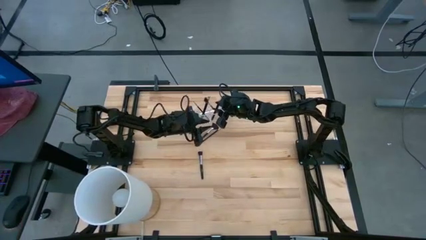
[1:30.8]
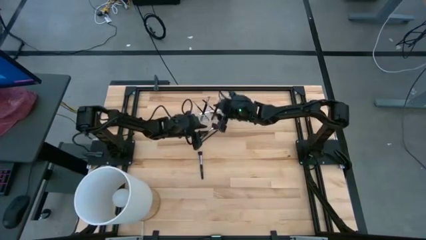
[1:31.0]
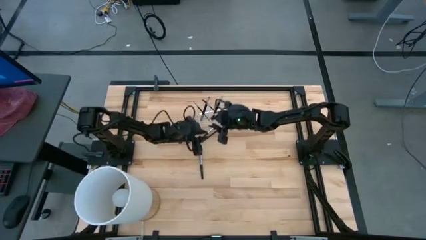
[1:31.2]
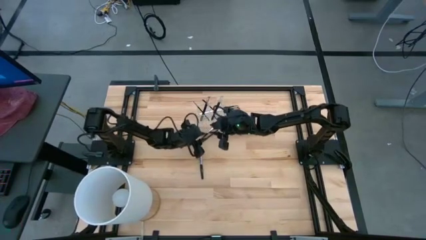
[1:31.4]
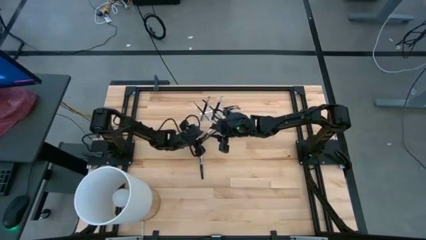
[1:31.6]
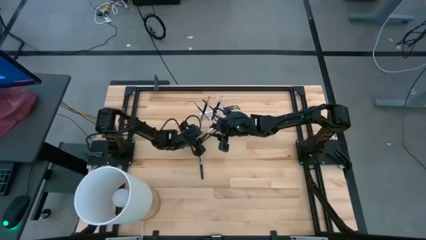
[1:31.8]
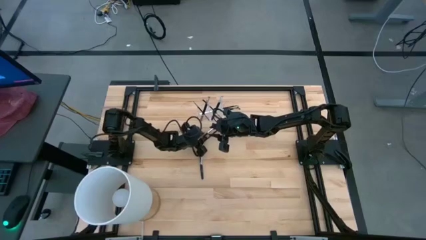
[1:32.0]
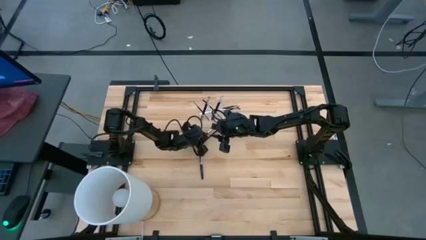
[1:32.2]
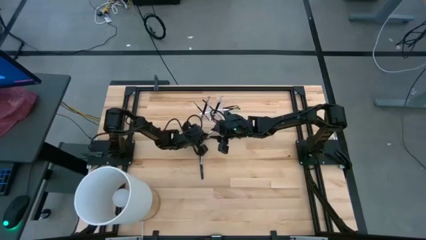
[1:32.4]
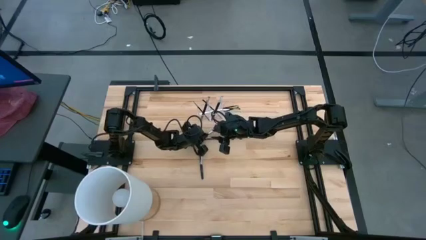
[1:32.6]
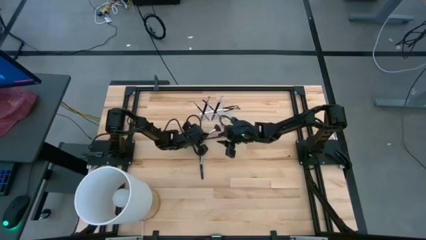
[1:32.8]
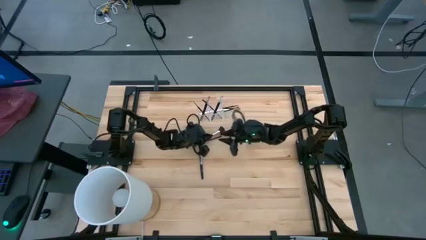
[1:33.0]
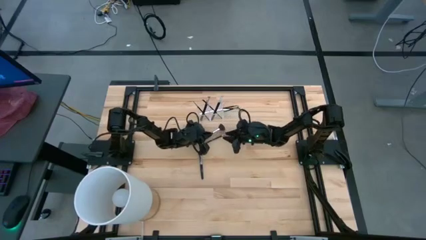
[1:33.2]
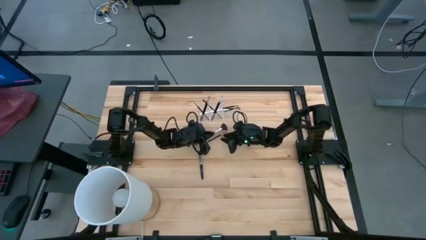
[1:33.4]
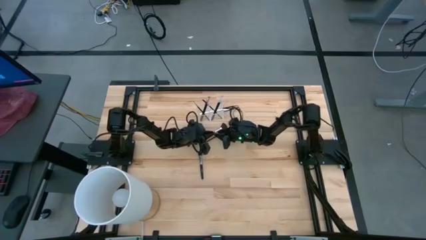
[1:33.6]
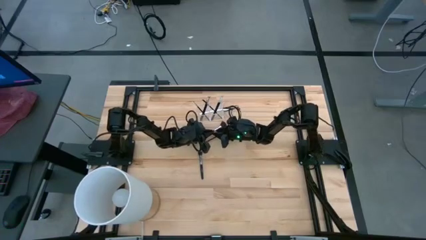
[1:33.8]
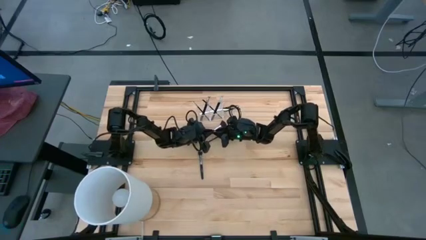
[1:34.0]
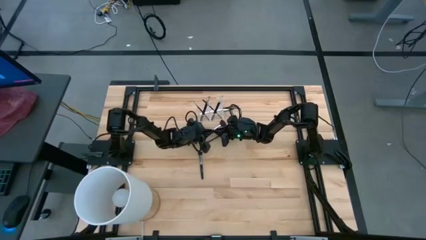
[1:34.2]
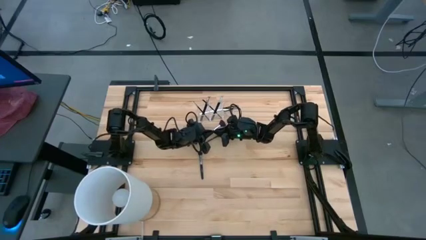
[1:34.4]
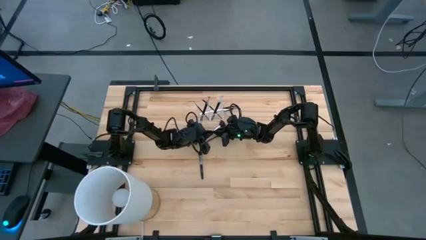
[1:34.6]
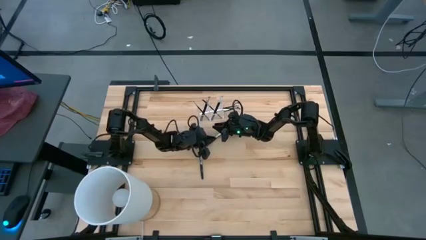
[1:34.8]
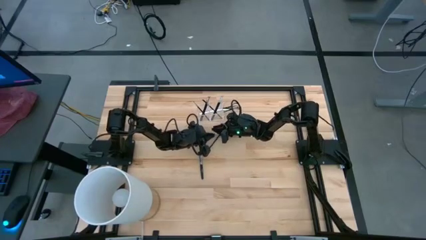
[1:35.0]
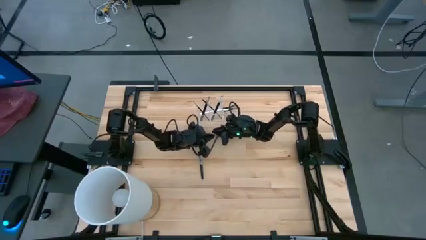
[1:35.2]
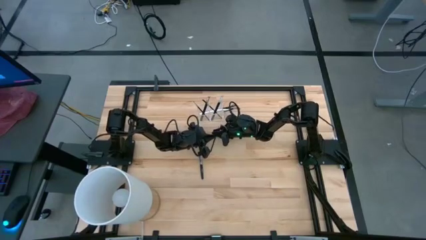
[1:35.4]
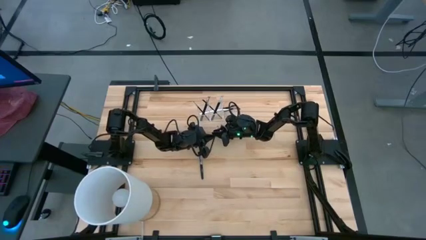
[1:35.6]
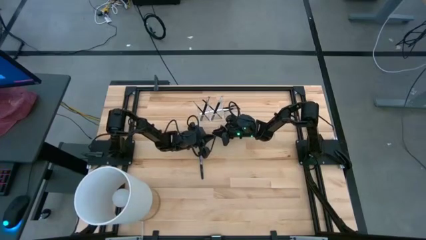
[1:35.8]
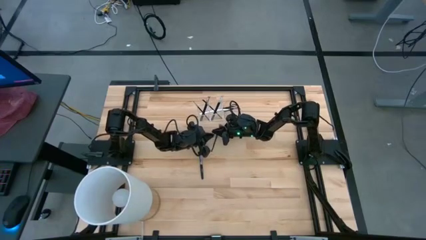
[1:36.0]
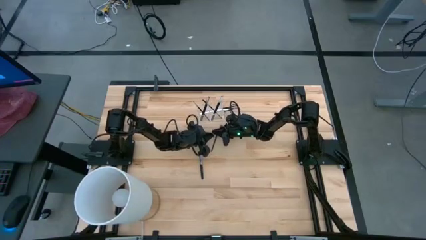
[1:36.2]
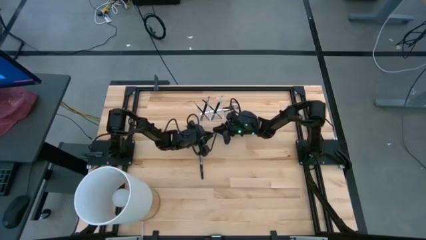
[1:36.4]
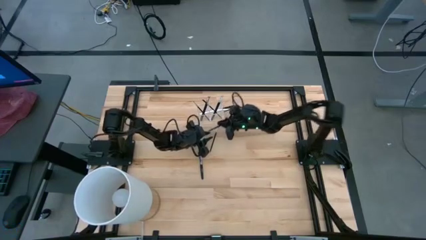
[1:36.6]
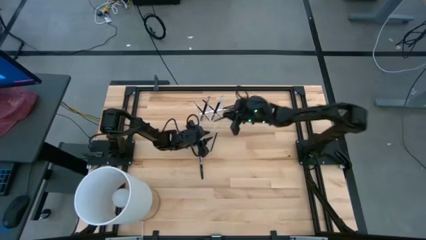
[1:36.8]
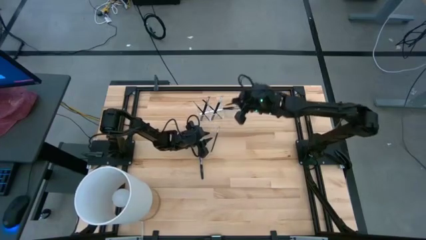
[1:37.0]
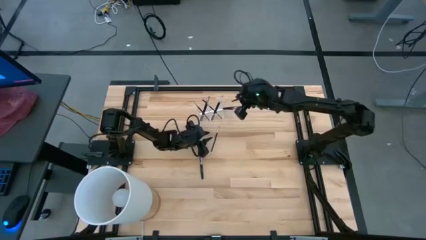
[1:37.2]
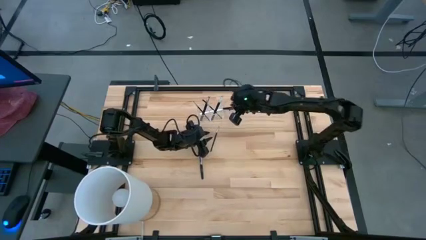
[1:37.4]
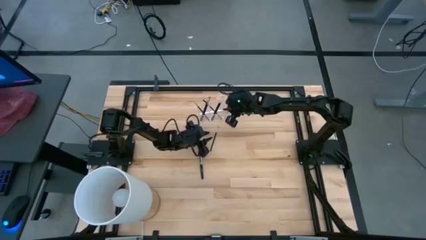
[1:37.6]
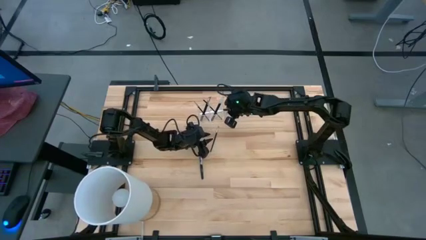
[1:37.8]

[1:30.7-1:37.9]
Task: Put items in baskets/containers
Put the black highlighter brush into the transparent organizer

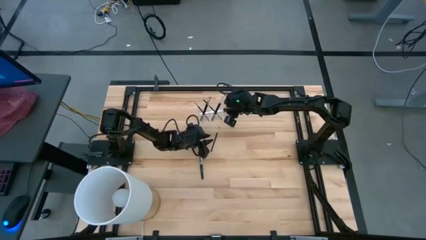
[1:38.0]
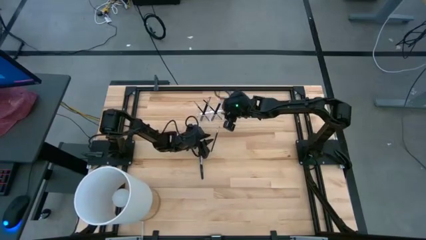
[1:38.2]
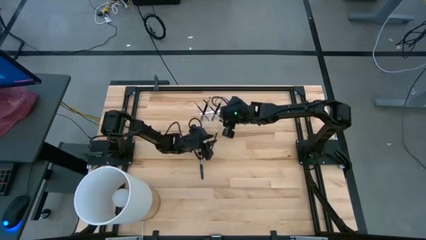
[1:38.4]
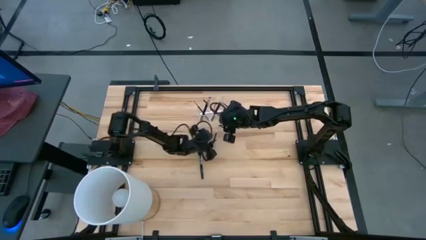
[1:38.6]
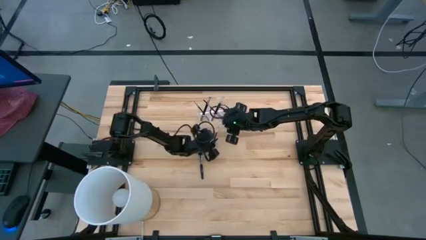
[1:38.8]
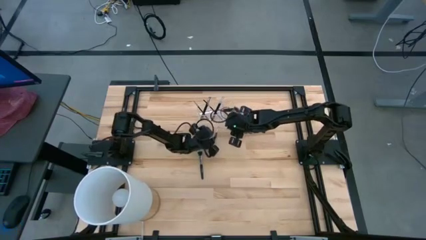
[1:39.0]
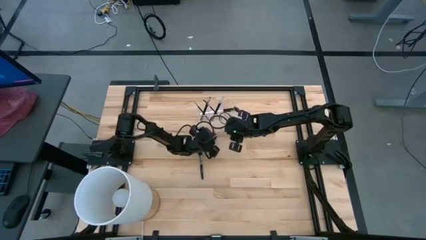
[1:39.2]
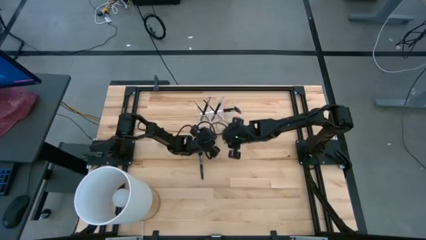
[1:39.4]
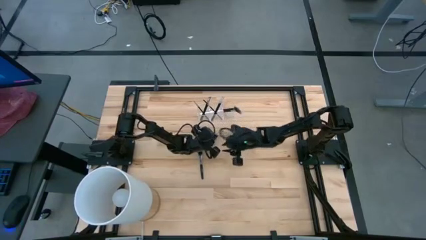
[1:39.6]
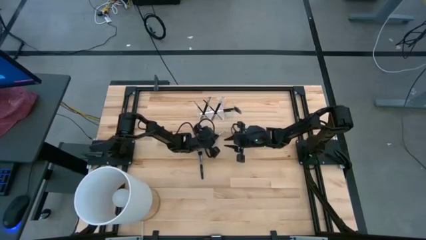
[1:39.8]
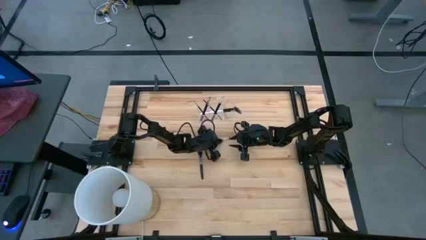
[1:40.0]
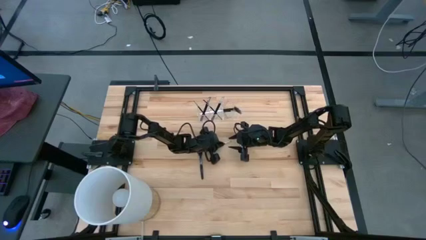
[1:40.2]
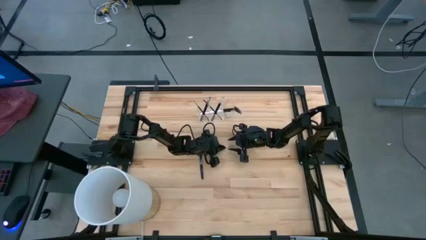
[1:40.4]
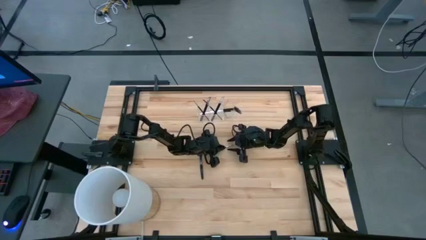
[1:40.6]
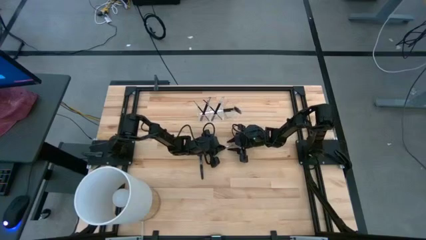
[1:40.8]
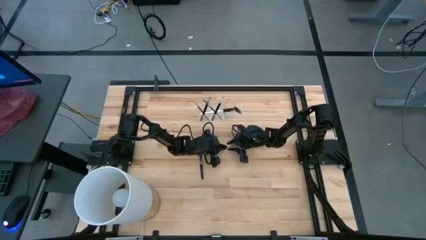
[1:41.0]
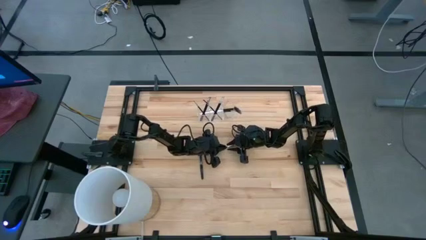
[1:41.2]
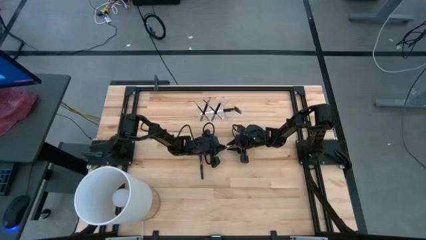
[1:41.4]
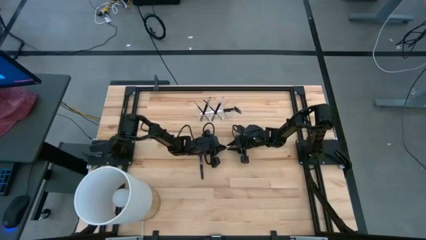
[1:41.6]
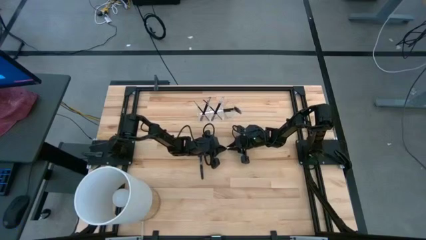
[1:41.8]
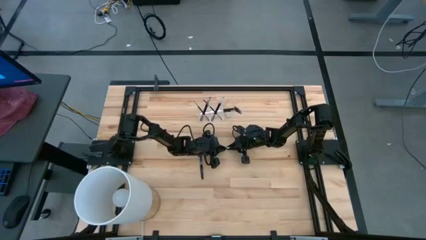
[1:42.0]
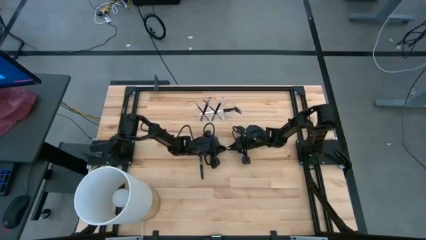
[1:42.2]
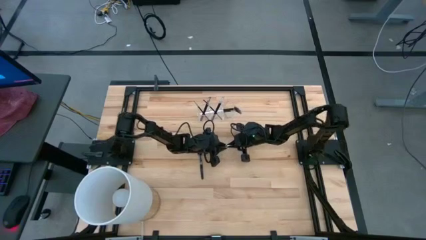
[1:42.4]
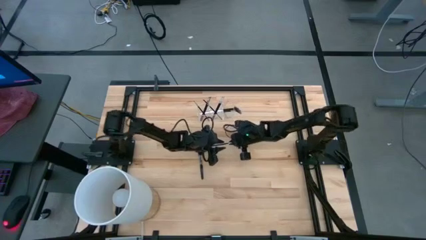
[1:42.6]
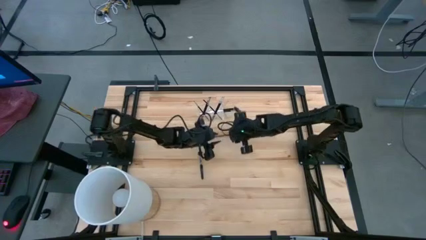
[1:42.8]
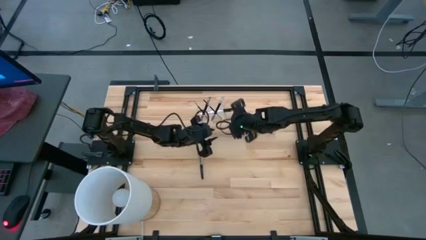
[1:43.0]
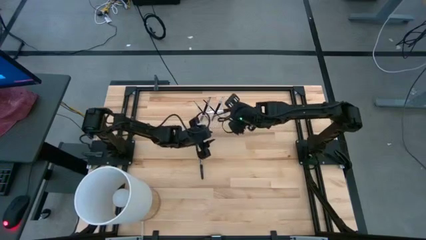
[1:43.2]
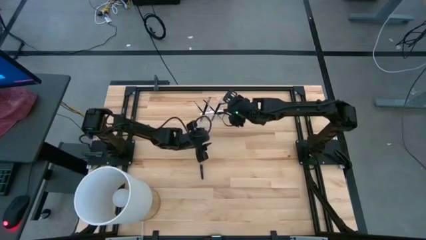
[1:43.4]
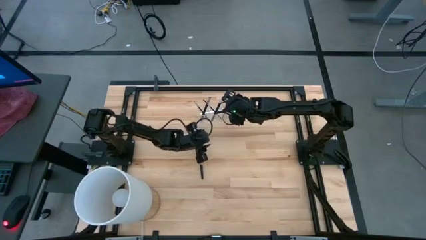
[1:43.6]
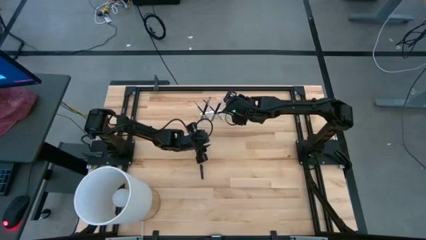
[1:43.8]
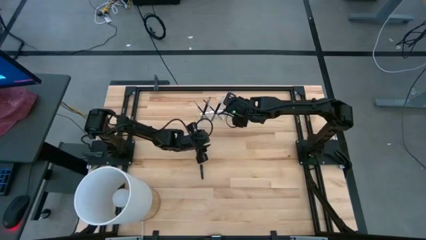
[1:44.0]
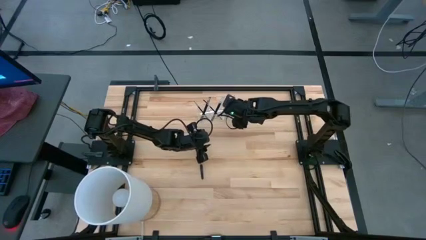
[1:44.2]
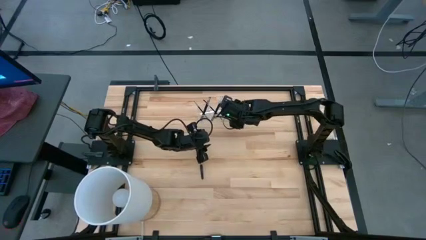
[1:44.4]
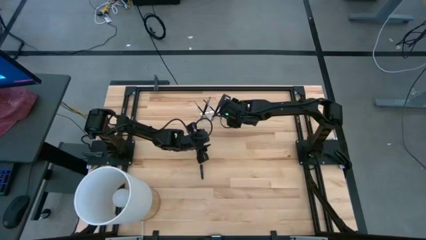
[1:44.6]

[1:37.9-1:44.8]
Put the black eyeshadow brush into the transparent organizer

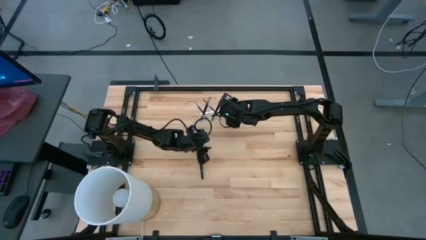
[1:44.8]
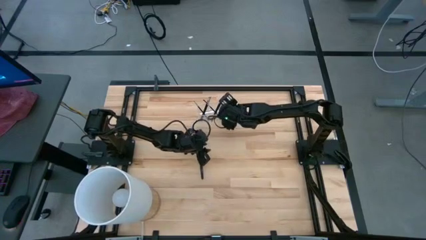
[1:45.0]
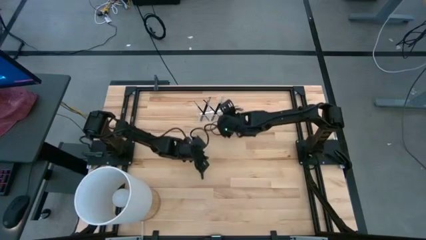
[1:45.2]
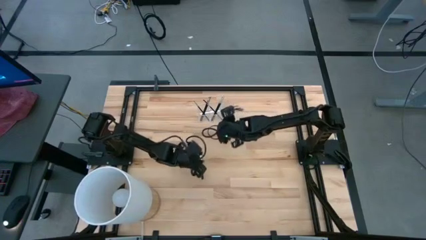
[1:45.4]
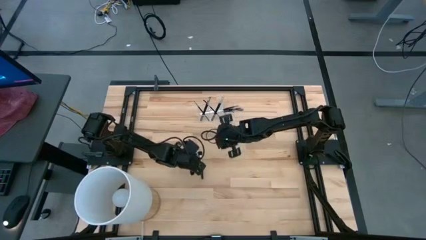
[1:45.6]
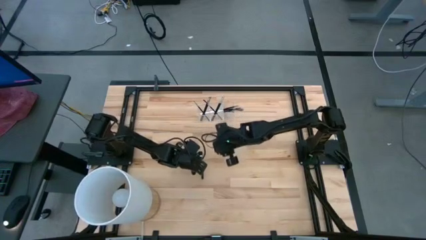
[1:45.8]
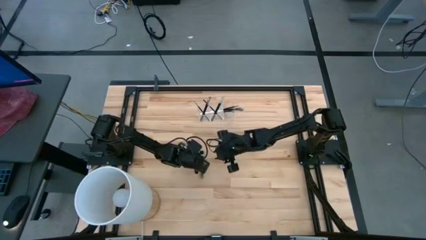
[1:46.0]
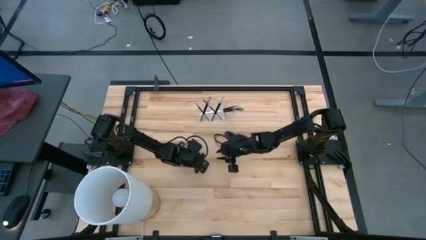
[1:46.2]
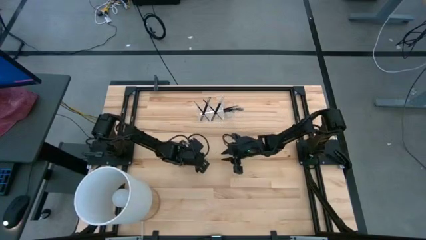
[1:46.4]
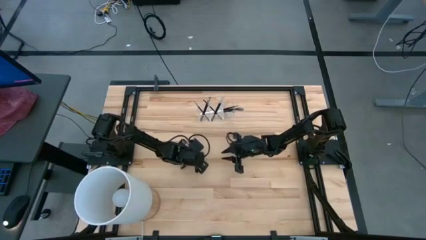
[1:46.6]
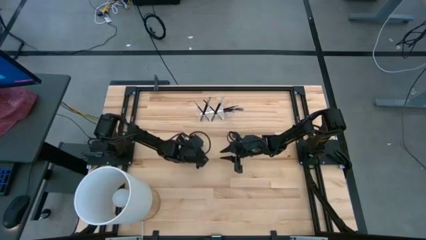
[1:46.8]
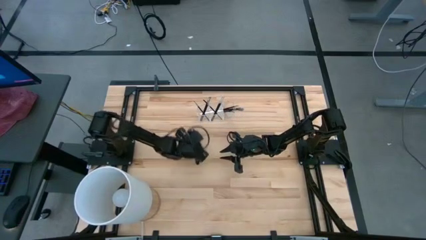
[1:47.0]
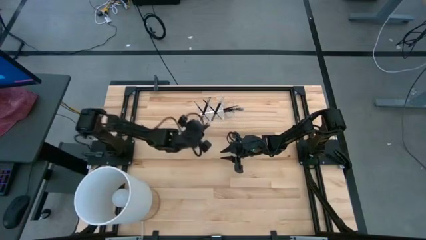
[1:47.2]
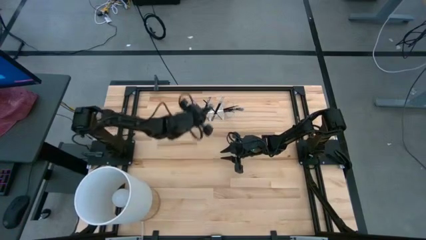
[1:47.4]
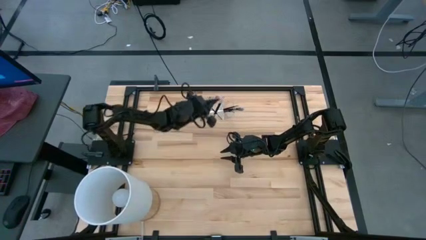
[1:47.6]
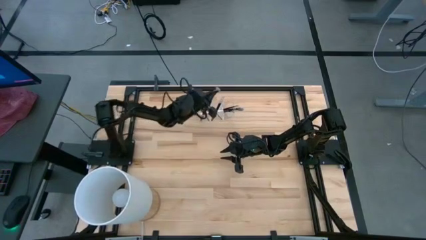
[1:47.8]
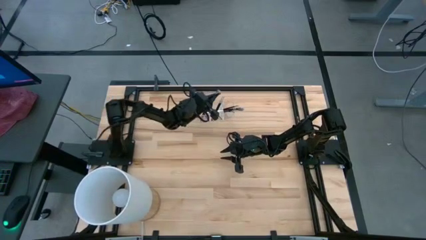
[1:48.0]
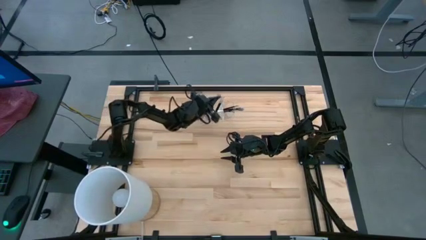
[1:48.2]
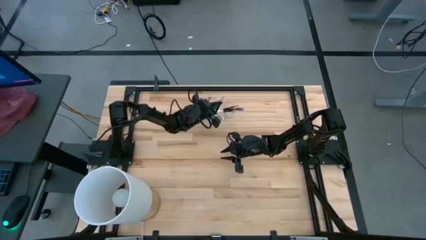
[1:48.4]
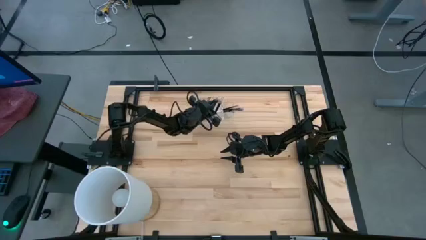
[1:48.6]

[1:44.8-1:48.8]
Put the black powder brush into the transparent organizer
